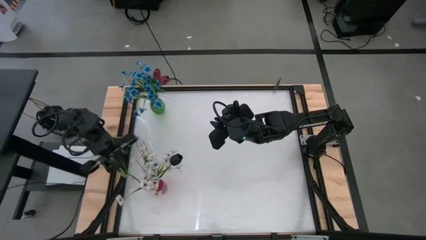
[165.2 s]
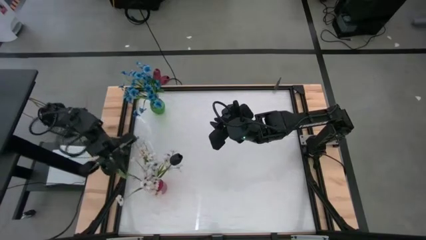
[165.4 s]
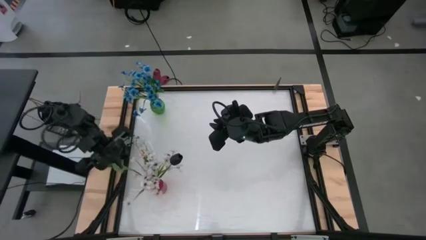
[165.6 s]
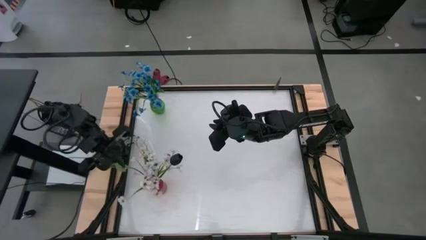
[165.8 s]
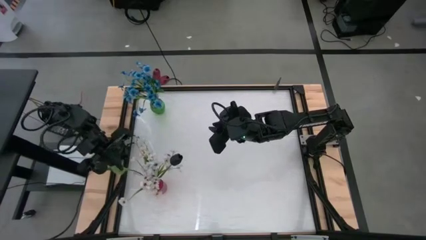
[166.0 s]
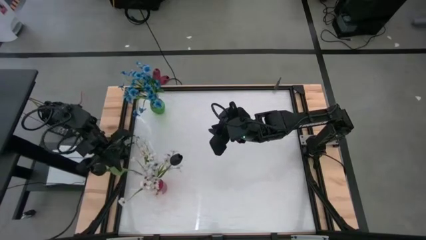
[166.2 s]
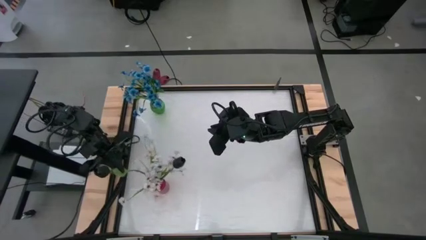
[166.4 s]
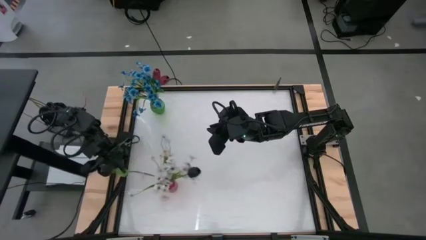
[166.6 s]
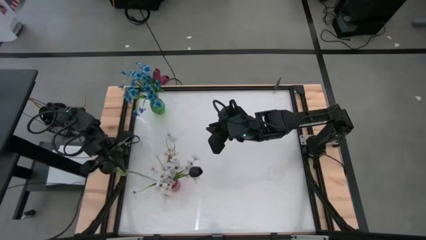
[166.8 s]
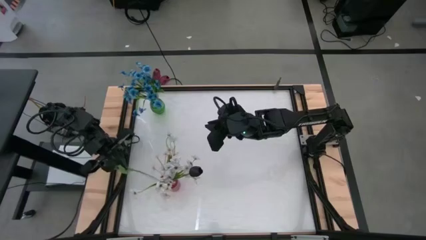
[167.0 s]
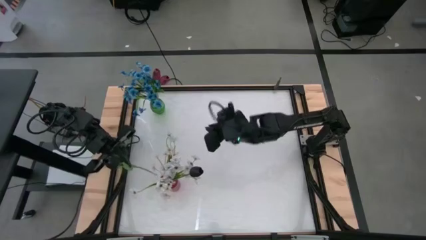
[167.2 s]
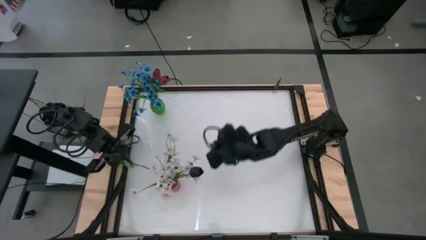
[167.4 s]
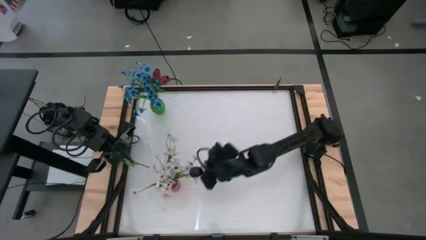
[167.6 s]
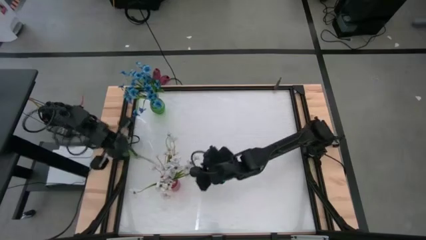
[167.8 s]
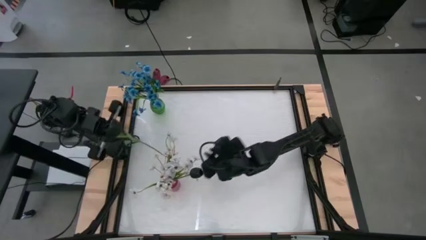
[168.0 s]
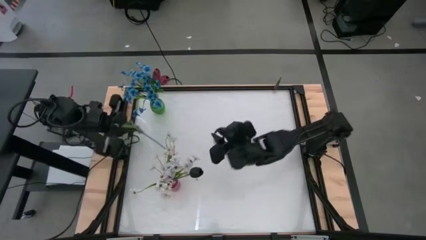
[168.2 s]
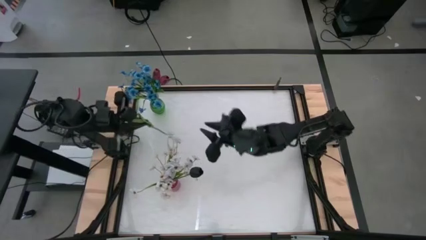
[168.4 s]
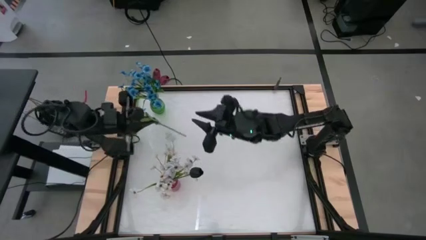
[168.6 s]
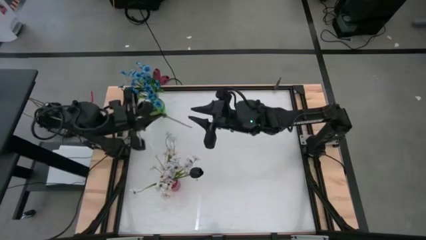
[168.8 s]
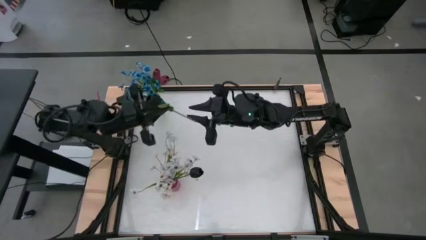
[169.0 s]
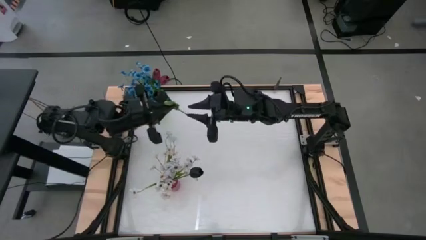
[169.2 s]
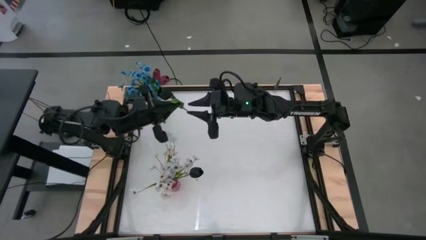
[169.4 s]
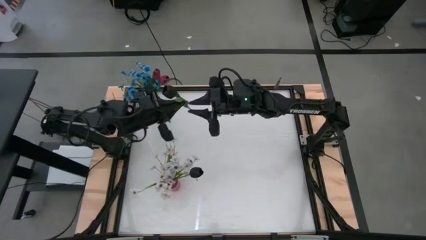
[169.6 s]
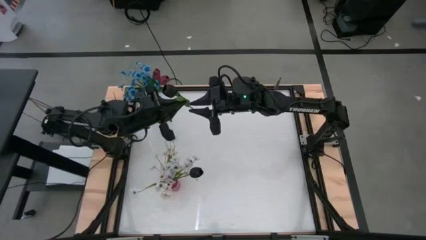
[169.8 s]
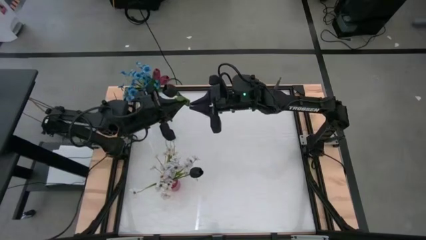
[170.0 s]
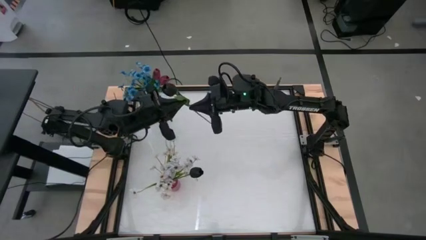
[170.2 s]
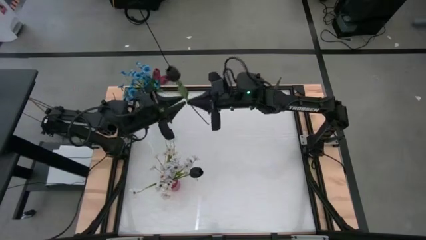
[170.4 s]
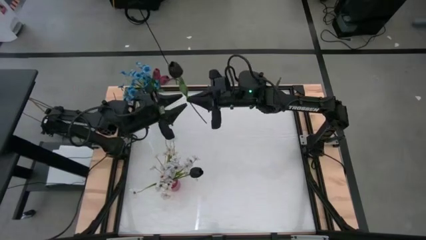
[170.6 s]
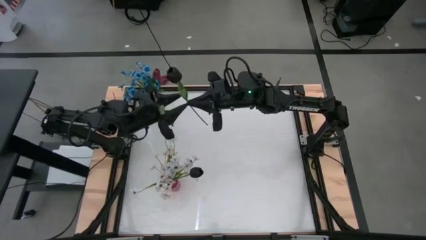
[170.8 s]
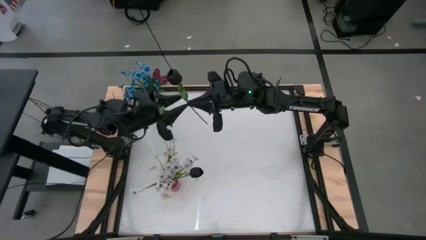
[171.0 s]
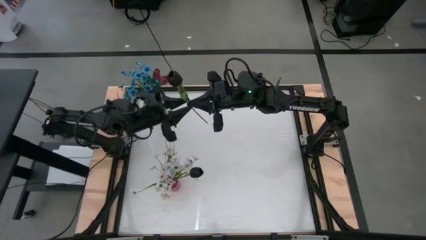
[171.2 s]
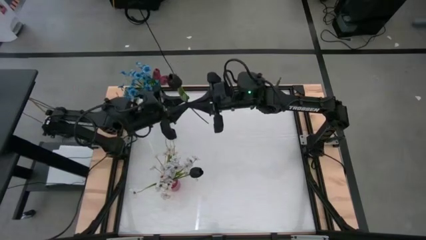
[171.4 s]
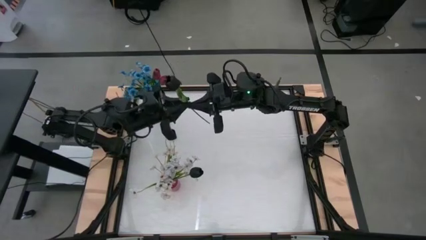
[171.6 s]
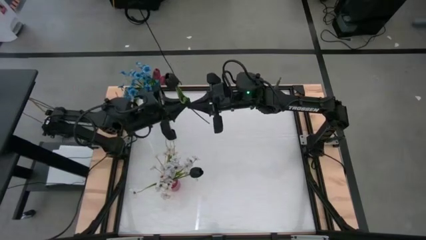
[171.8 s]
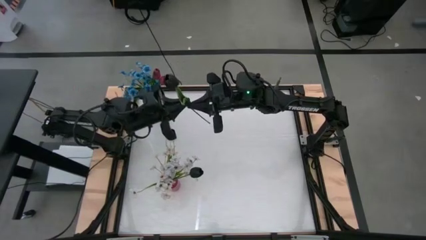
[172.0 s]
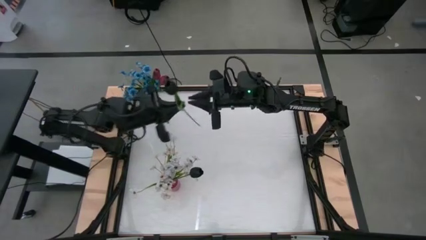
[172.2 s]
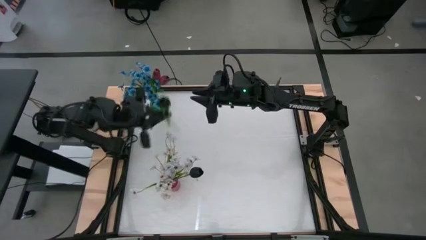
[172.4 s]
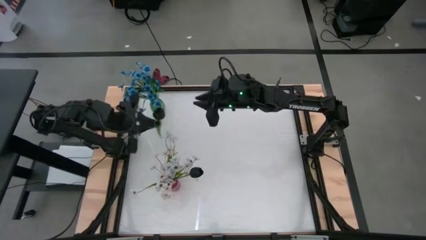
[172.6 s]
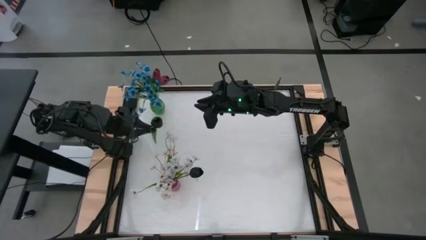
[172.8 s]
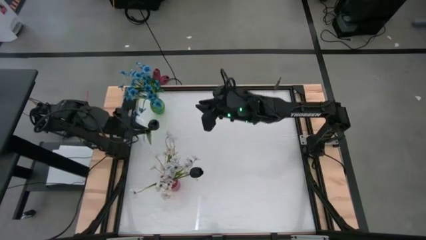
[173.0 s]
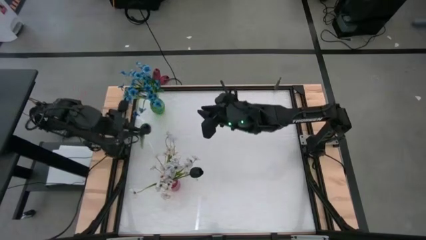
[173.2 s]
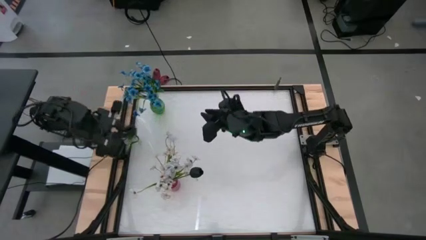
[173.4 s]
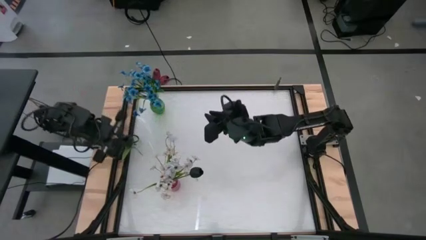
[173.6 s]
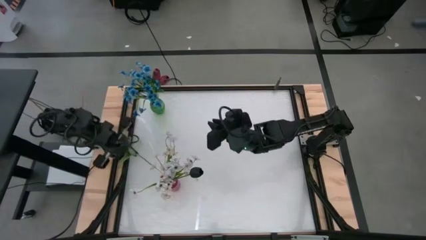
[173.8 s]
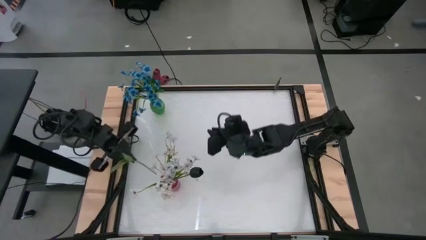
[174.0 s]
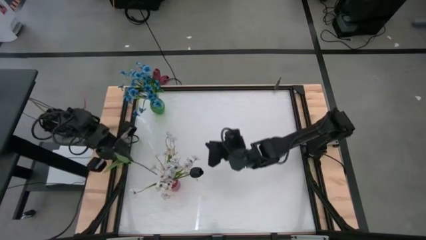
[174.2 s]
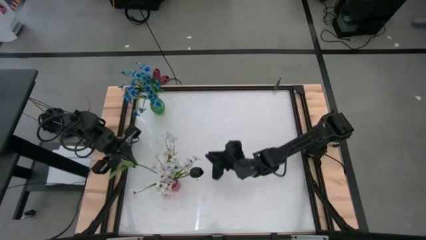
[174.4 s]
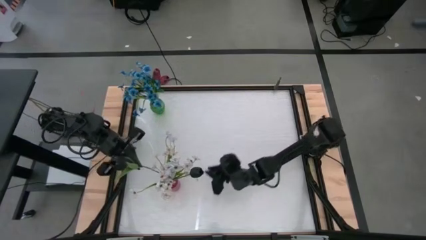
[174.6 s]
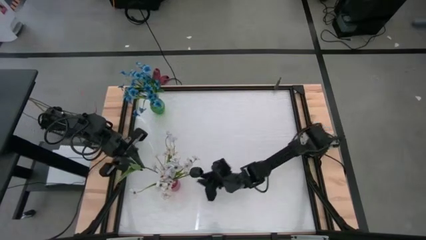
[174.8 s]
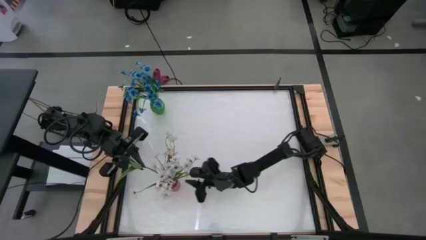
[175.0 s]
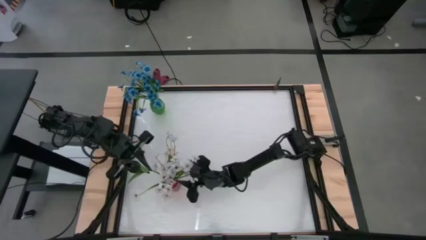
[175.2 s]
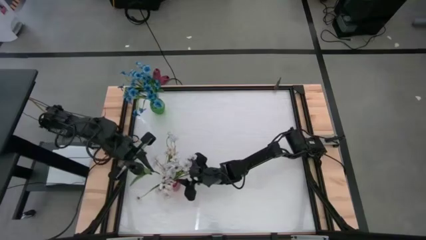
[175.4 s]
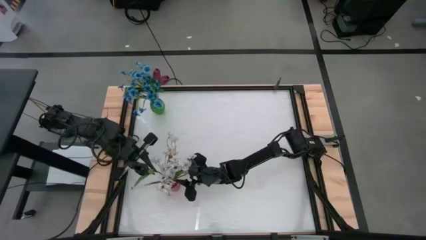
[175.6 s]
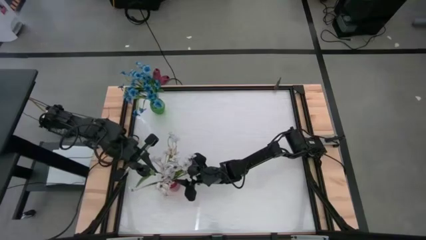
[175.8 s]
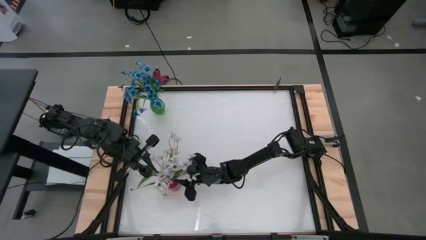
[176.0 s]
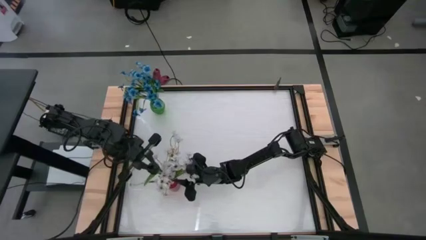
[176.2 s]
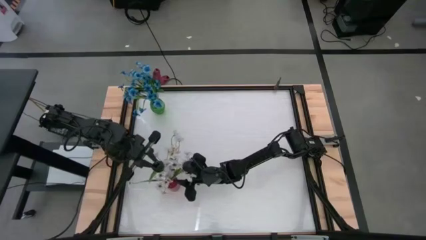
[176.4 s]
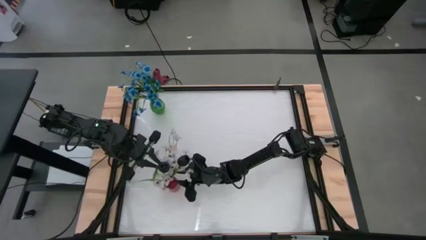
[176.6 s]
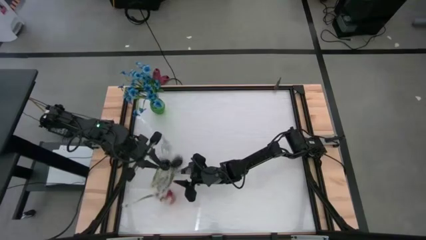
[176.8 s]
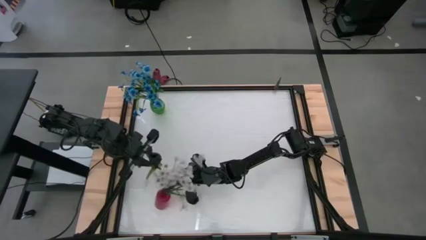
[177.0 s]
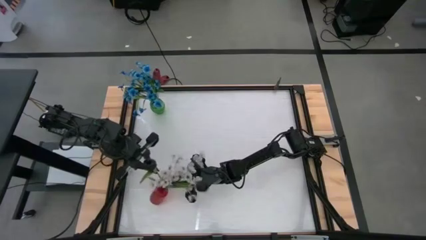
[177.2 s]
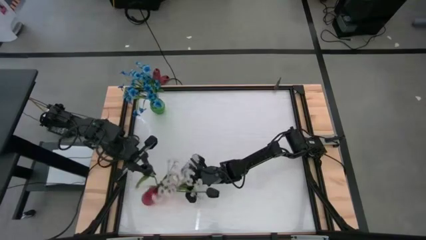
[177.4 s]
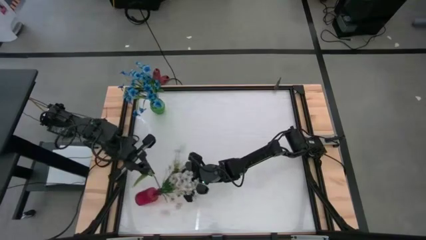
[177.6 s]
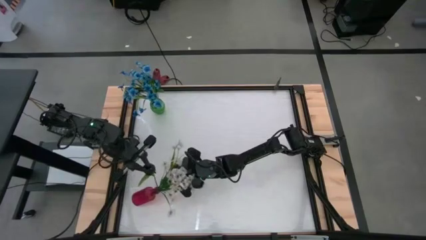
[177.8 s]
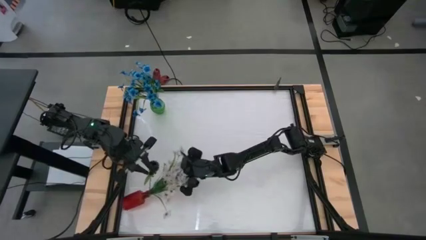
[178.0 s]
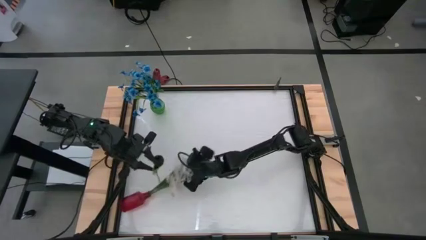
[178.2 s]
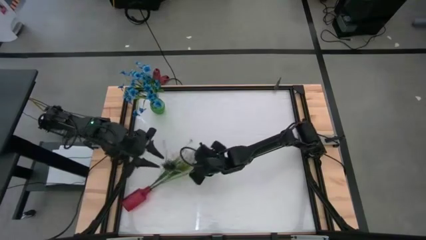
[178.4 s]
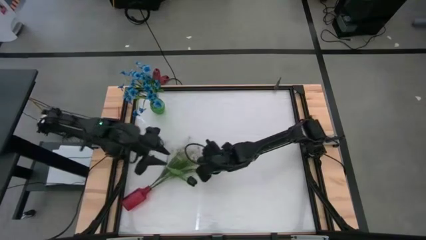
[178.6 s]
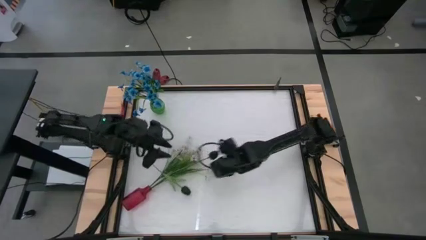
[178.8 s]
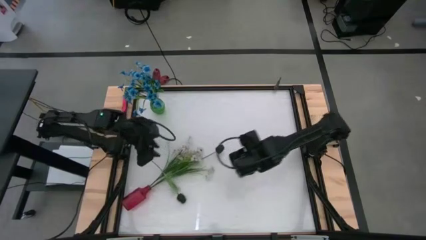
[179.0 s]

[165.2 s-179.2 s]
Task: Sort flowers into vase by color
Put the black tulip into the red vase

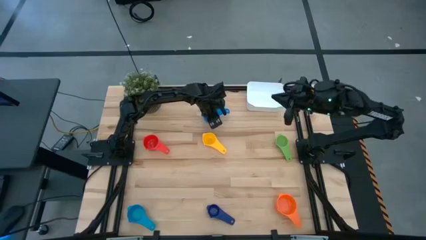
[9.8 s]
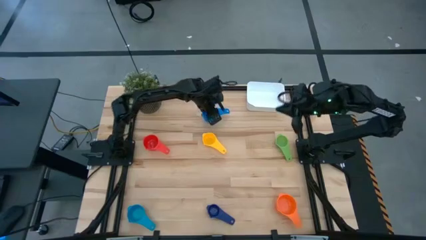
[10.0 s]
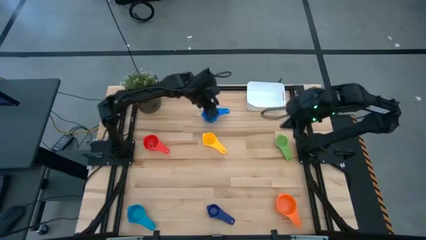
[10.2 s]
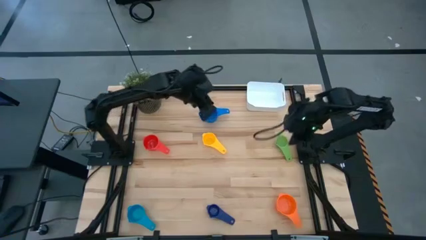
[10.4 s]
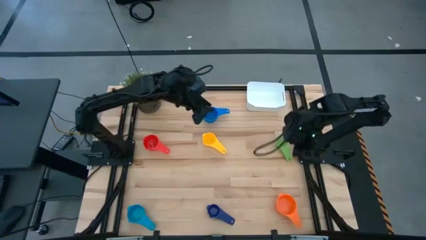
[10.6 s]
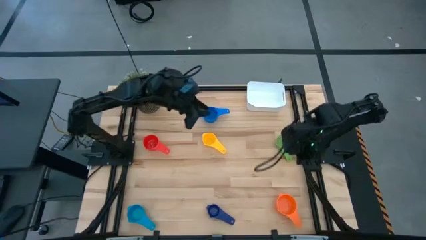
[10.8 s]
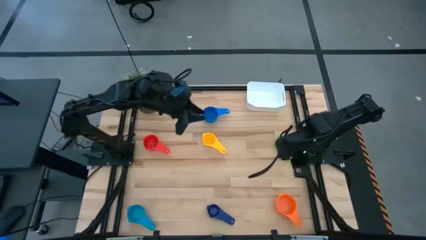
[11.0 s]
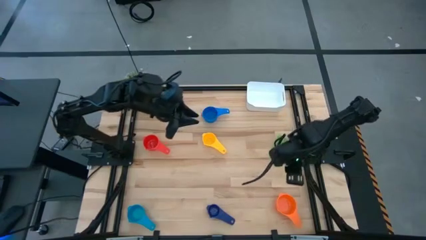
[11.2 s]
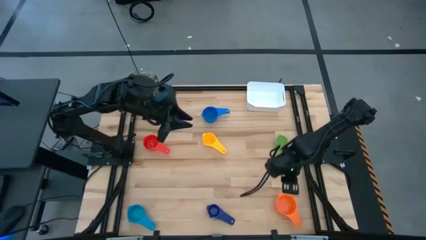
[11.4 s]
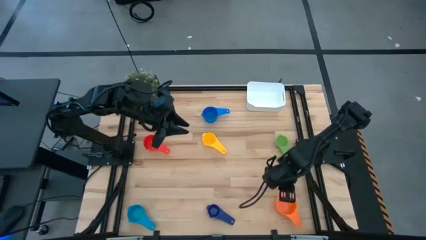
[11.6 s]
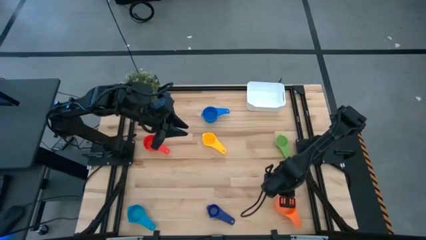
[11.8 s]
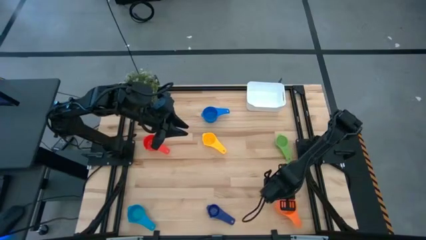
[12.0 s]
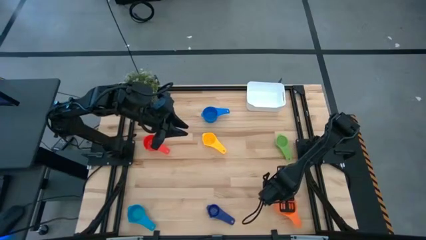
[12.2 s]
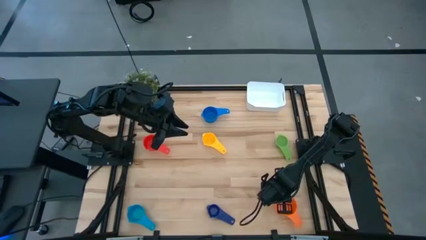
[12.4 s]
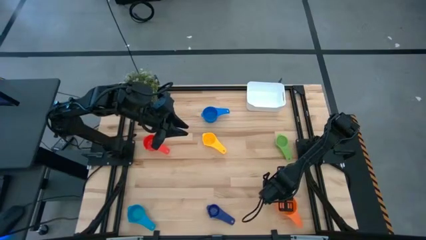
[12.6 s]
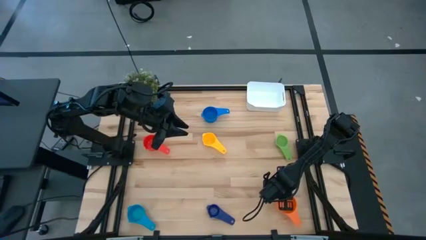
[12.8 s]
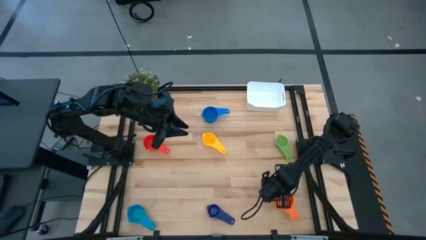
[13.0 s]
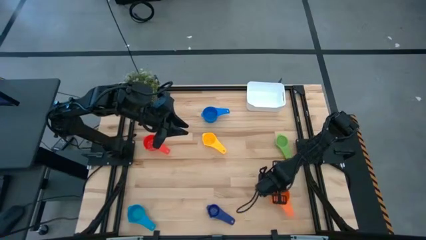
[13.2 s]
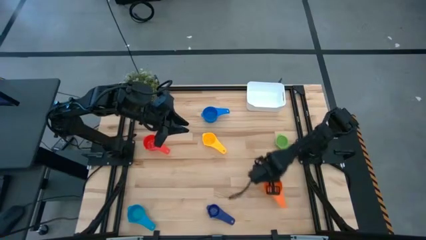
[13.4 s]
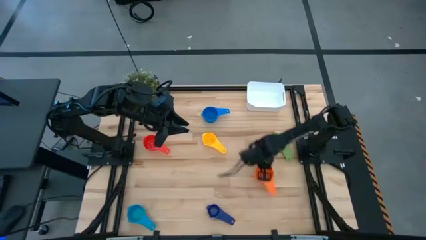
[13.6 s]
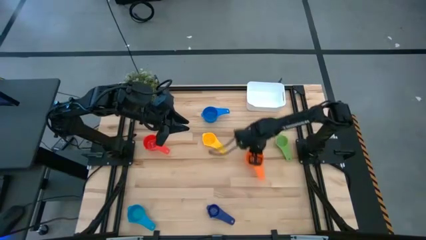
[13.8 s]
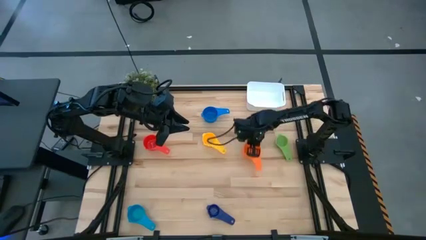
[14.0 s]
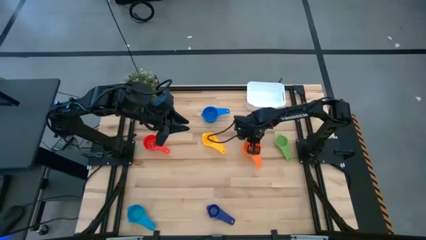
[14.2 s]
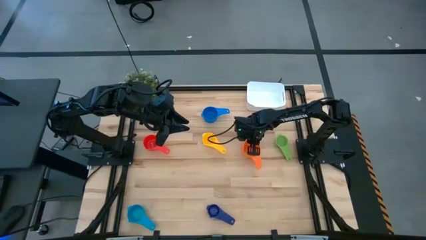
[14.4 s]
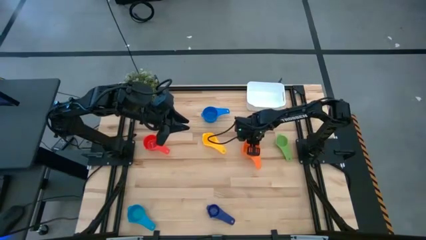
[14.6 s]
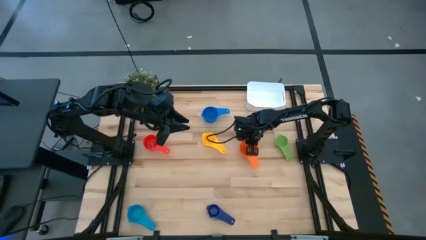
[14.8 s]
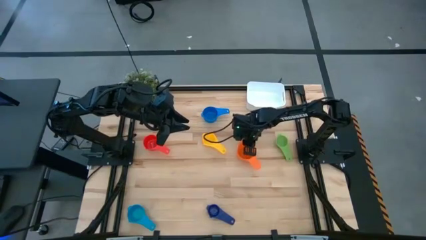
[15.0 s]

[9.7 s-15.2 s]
Task: Nest measuring cups in basket
Move the orange measuring cup to the middle right of the table
